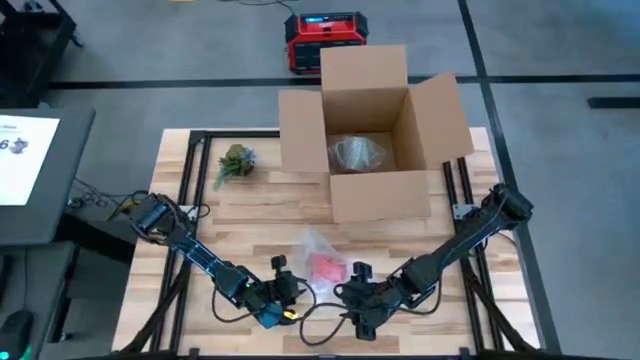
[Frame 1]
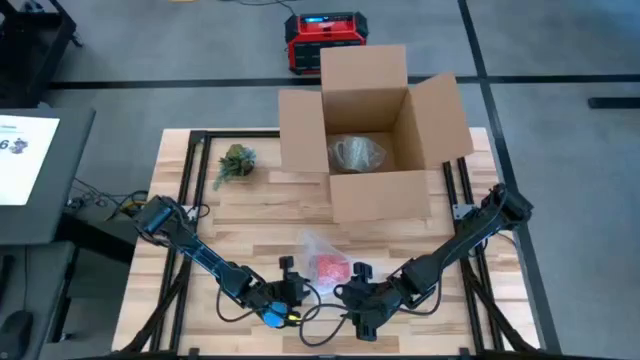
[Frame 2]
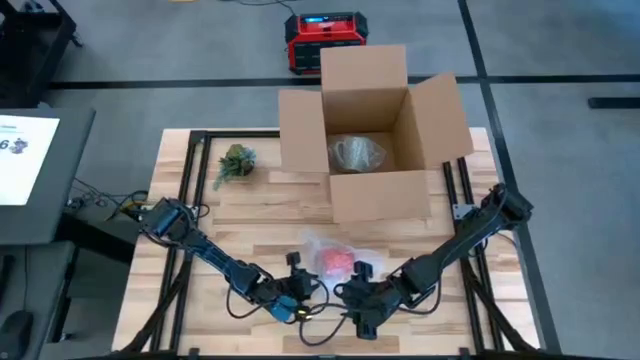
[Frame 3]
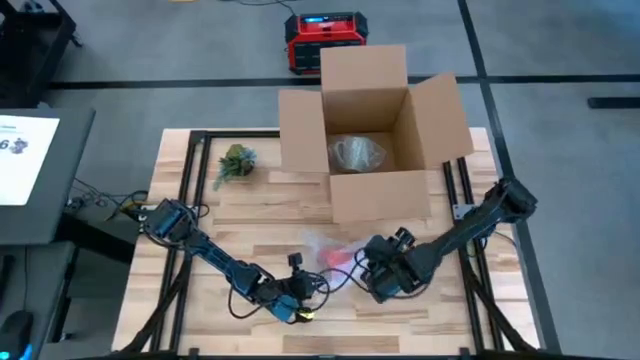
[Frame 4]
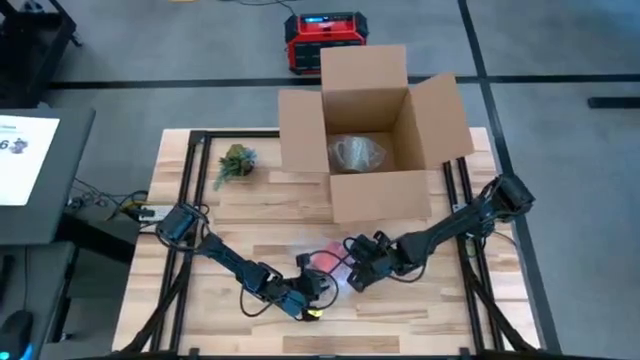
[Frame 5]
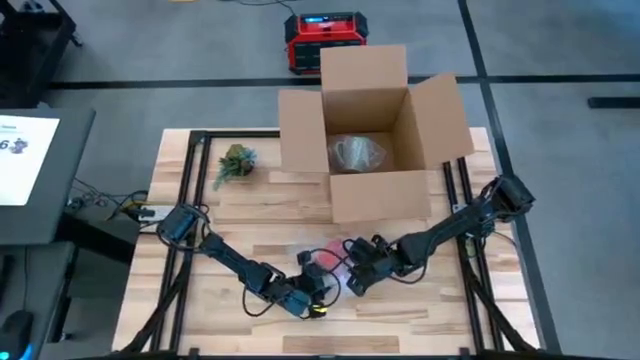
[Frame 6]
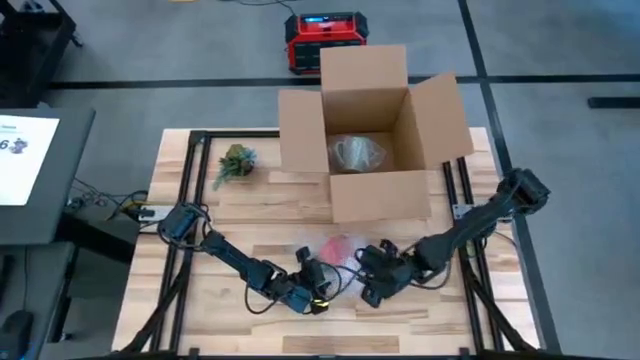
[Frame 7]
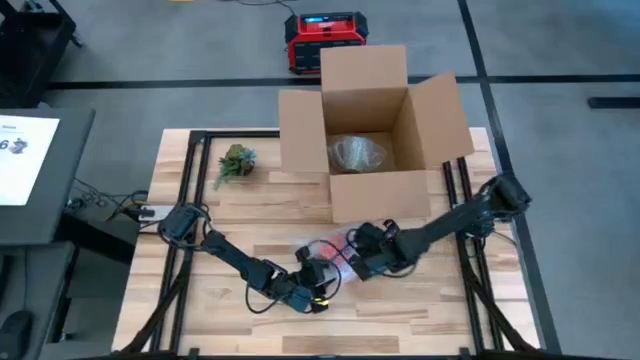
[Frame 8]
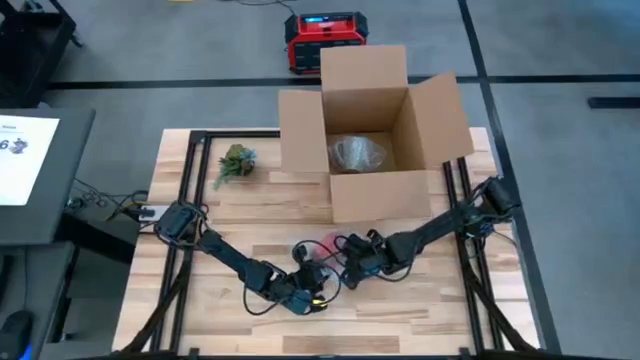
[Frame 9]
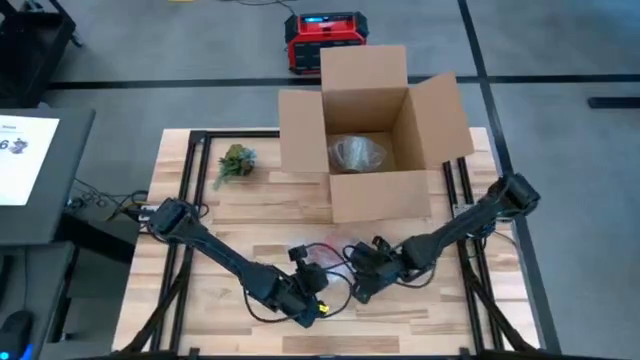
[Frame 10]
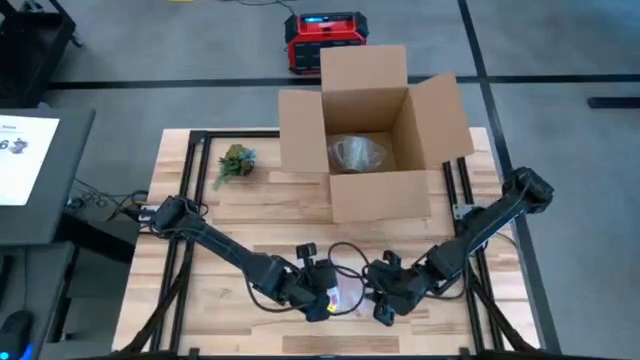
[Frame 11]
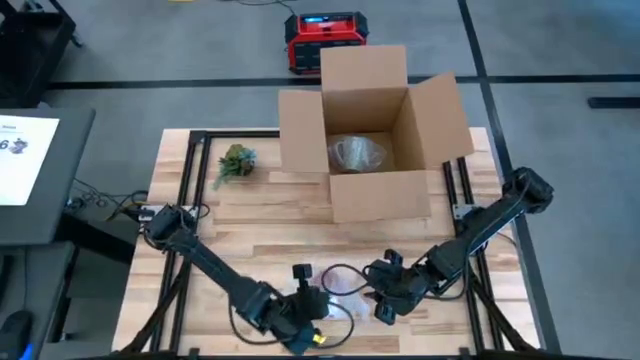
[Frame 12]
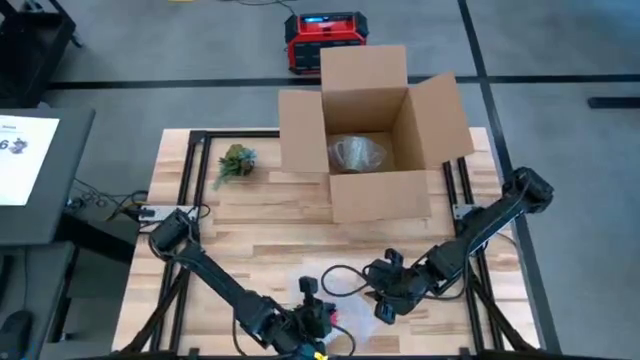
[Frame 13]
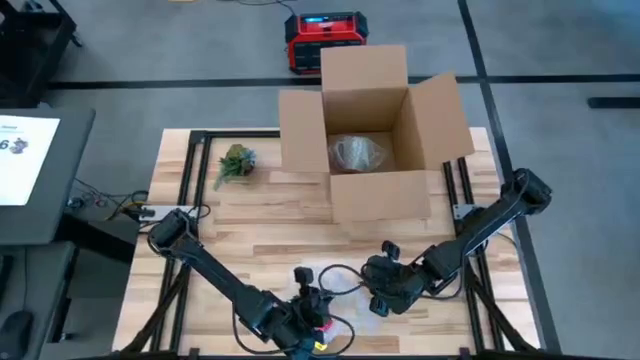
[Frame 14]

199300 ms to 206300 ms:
Task: wrap mug
Wrap the red mug with the transparent bubble wrap

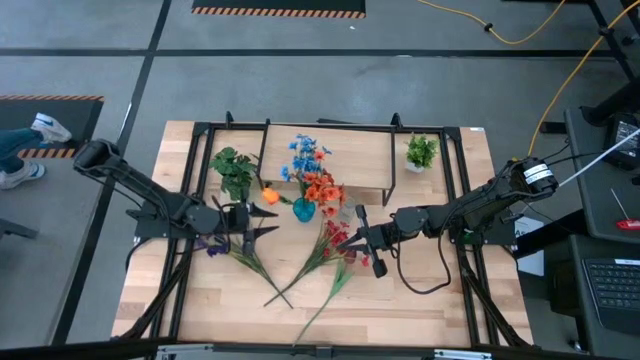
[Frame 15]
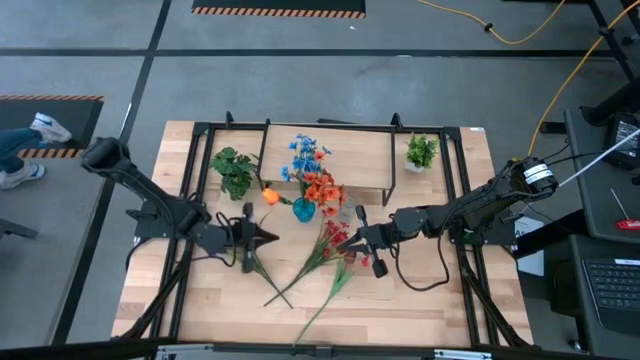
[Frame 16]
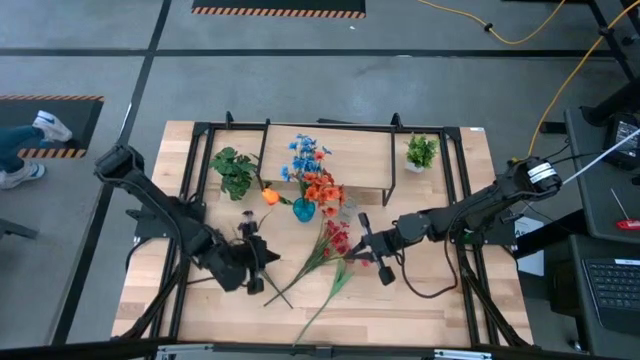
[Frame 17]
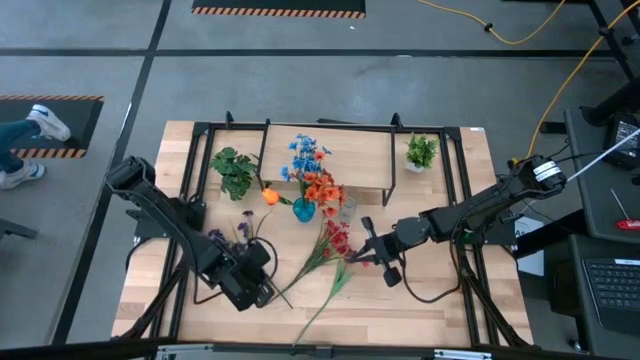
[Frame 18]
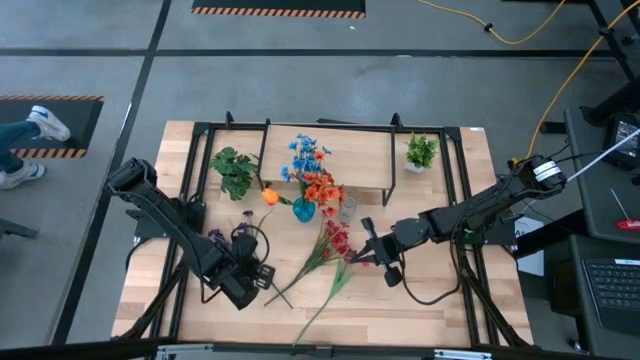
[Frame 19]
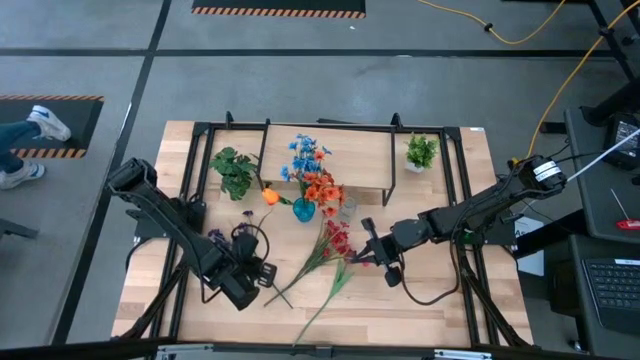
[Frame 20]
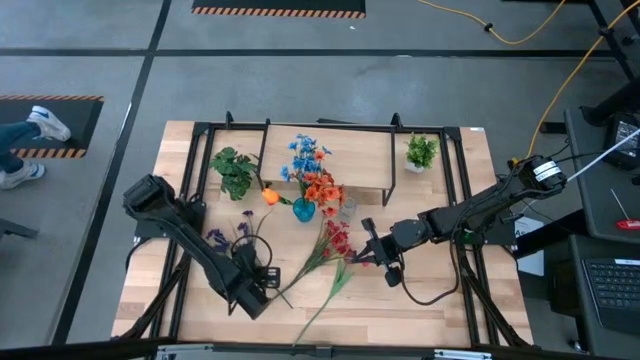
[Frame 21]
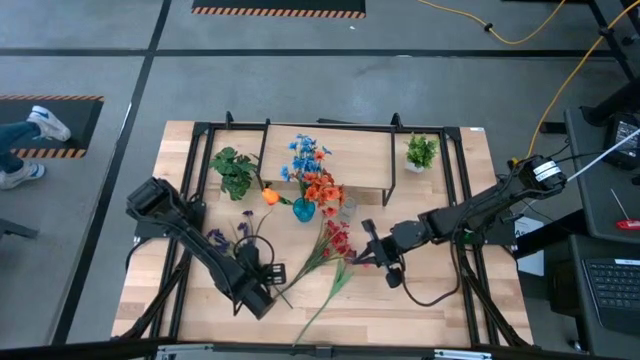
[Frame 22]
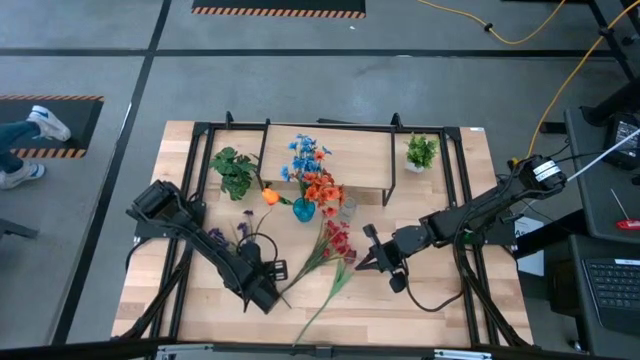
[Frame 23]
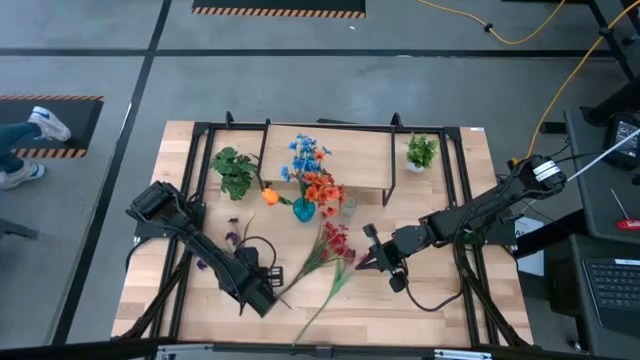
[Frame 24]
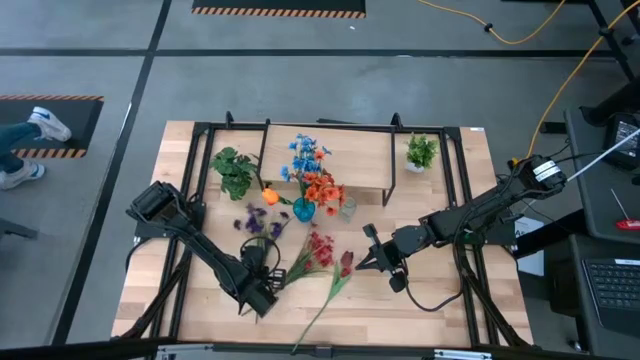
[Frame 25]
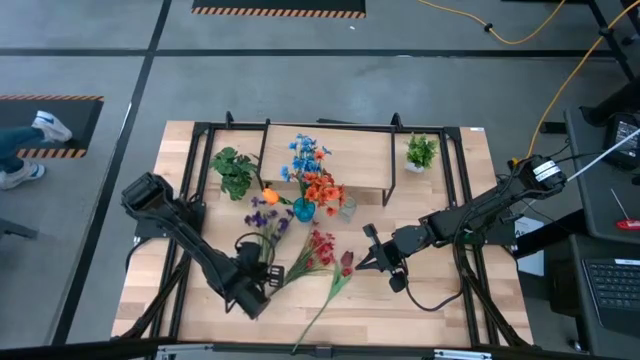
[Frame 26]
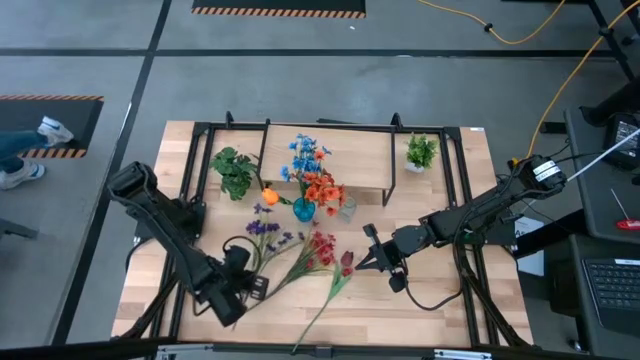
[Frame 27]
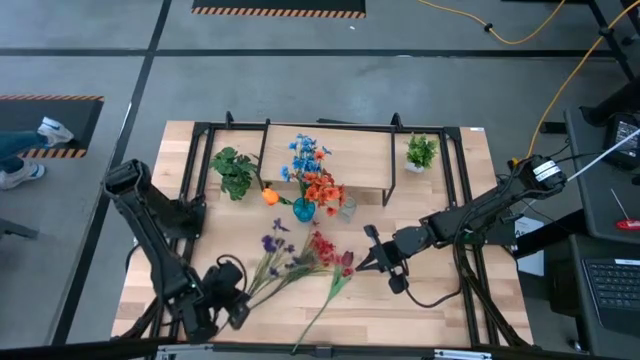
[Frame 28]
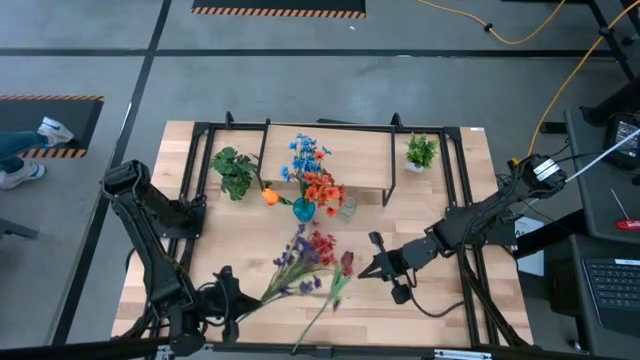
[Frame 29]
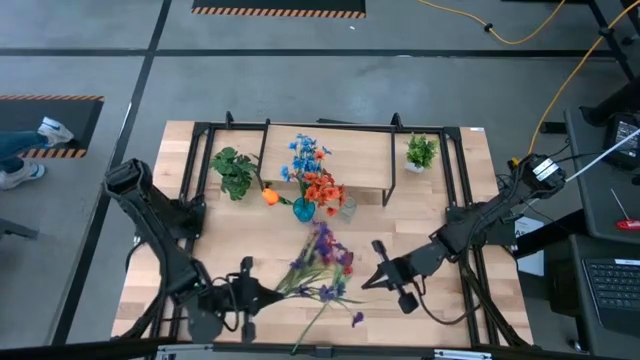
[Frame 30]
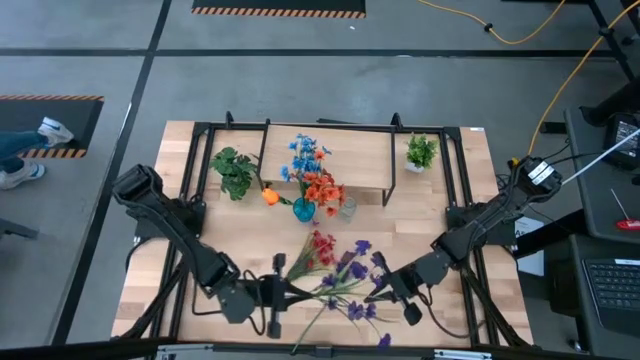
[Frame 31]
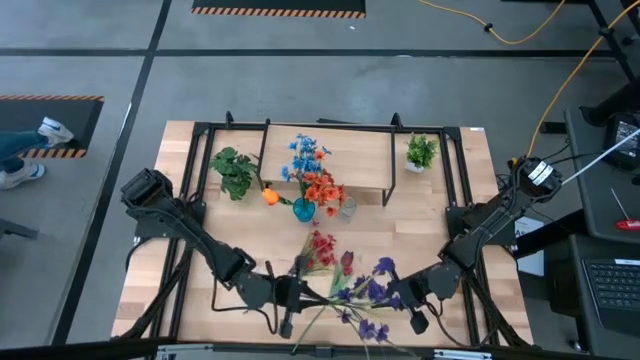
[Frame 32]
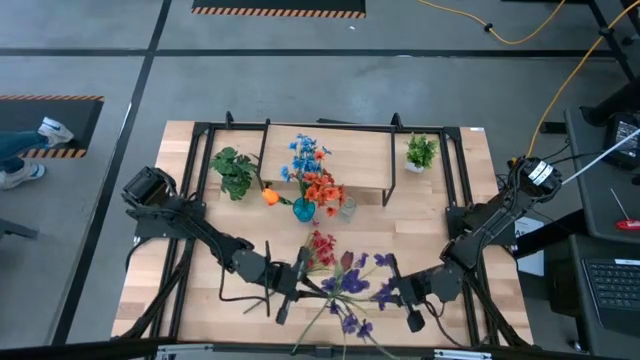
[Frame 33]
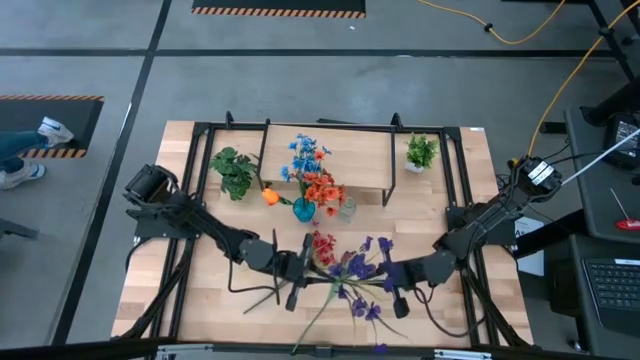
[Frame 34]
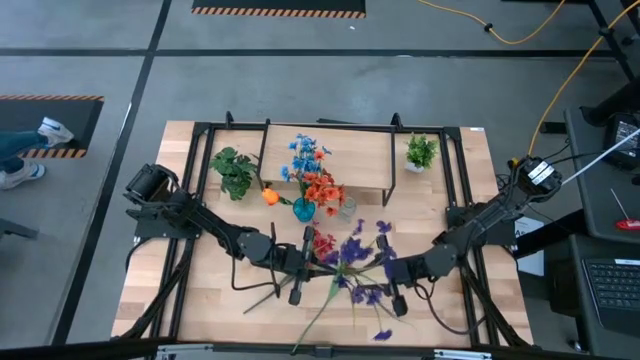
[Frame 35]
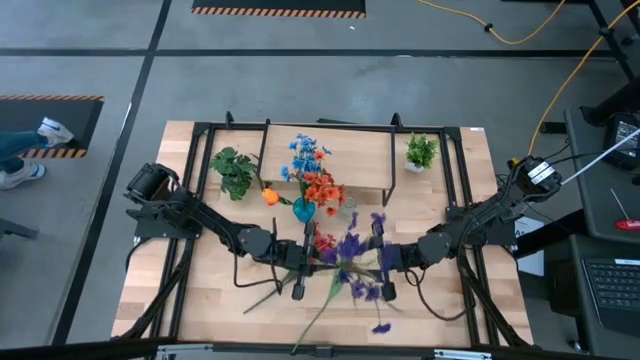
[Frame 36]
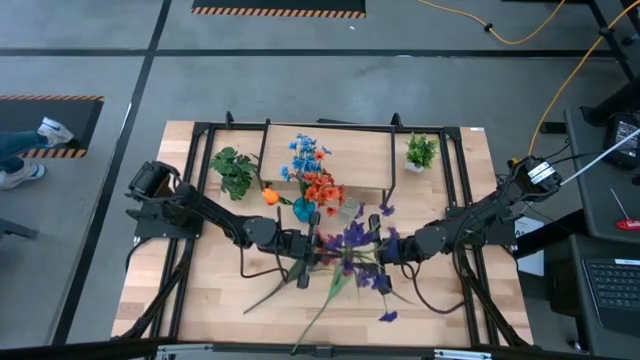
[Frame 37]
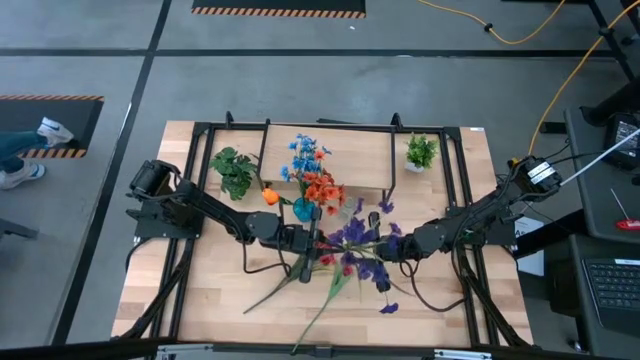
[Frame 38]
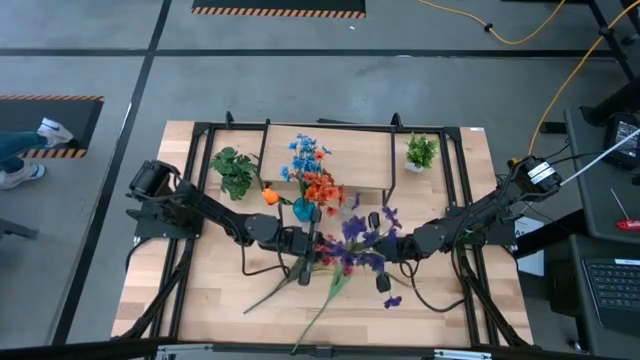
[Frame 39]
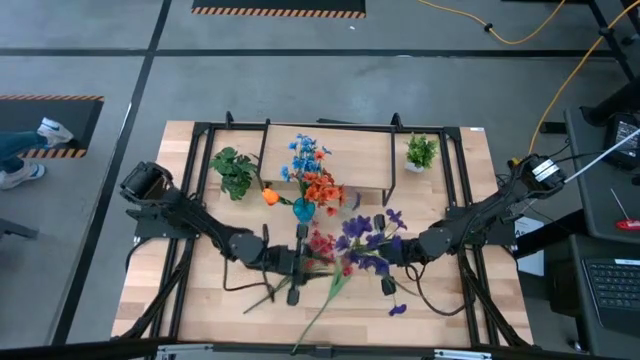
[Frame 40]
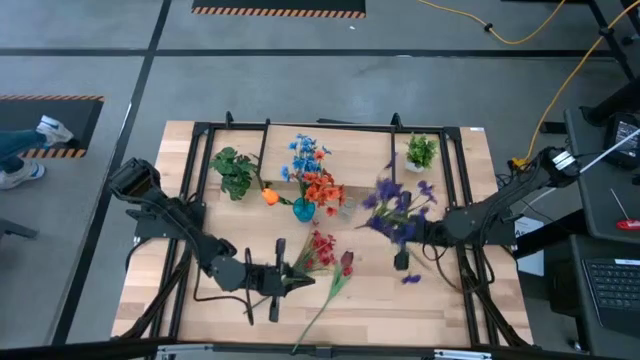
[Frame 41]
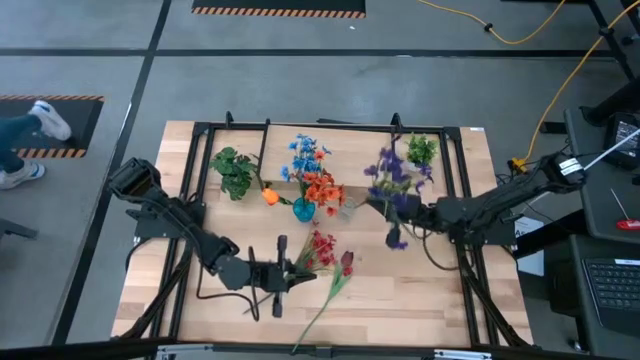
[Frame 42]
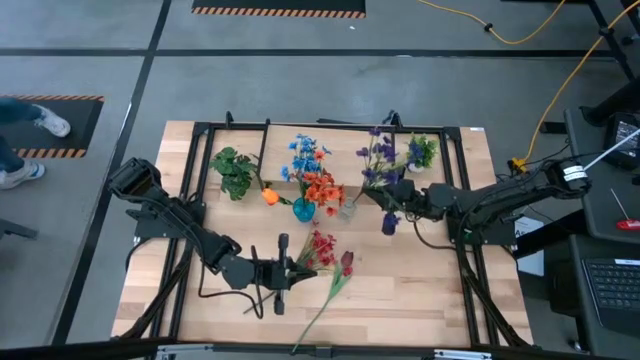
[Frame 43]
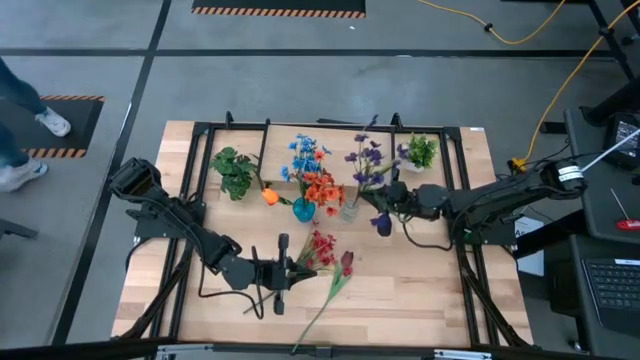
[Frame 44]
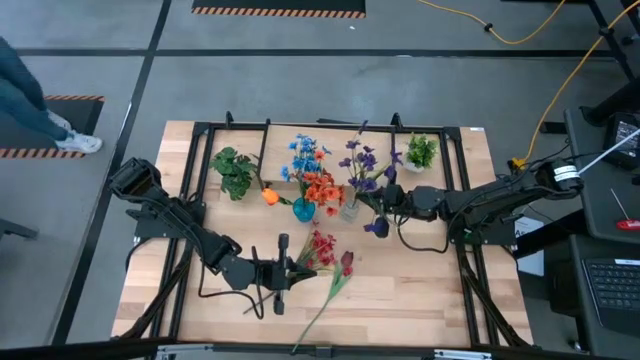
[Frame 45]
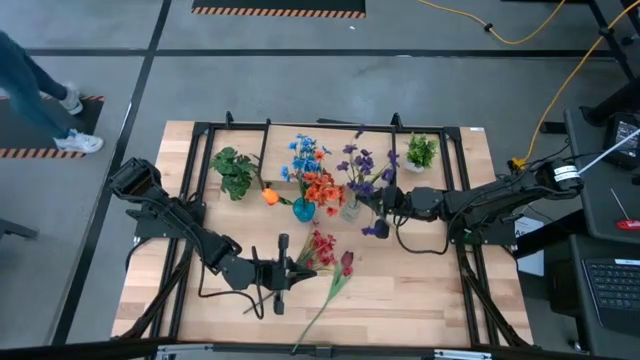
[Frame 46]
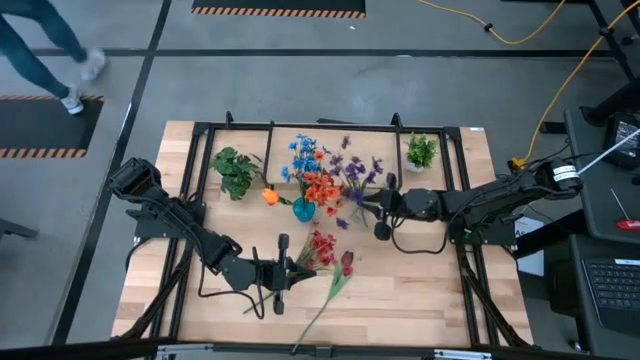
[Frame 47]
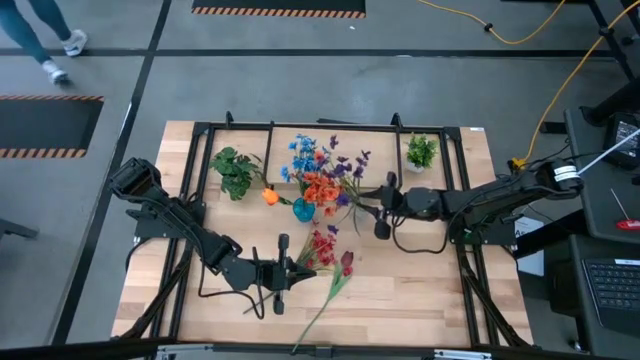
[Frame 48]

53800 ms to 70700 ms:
Task: Pick and place flowers into a vace then onto a shelf
Put the purple flowers into the transparent vase
